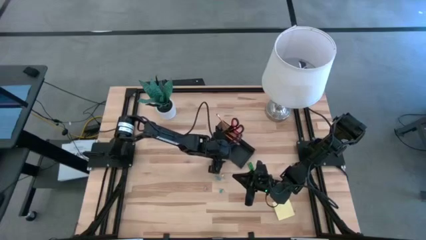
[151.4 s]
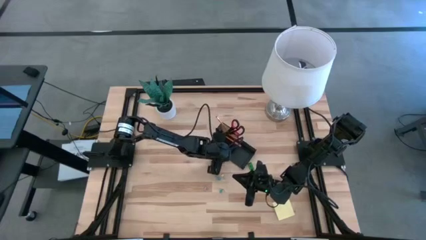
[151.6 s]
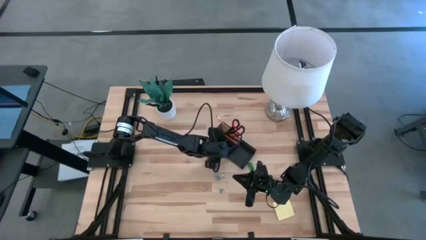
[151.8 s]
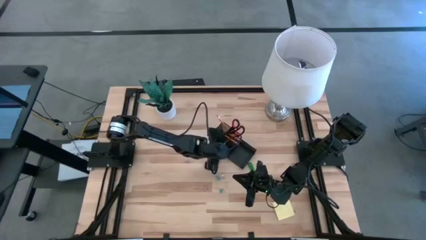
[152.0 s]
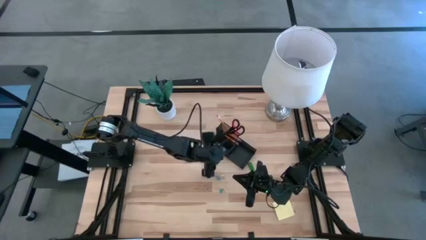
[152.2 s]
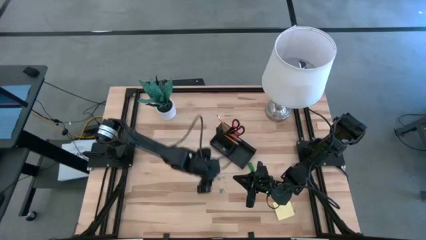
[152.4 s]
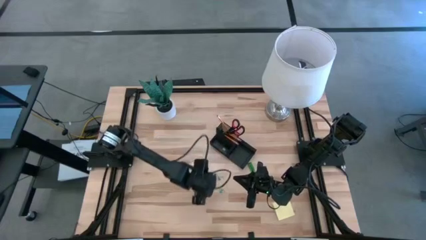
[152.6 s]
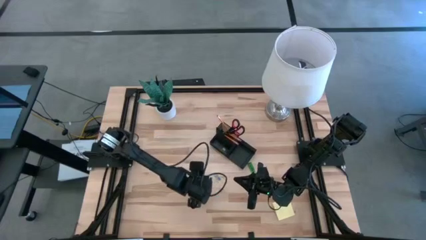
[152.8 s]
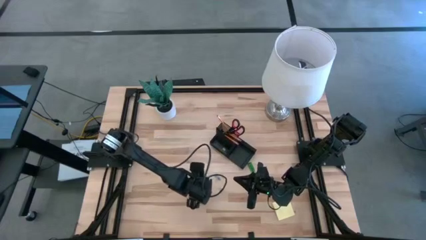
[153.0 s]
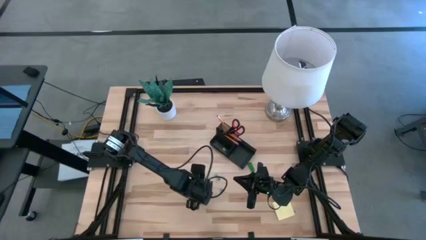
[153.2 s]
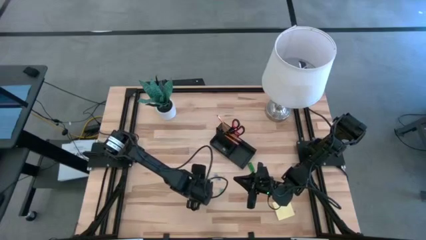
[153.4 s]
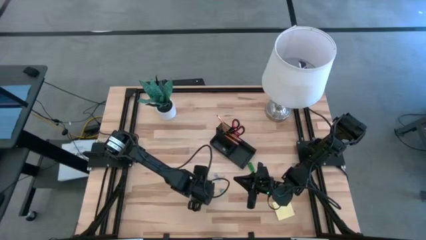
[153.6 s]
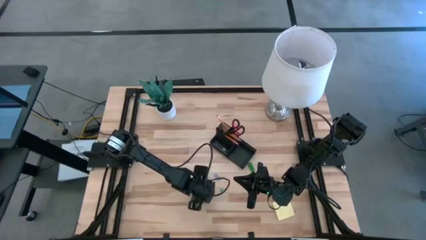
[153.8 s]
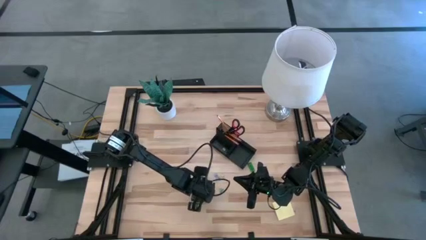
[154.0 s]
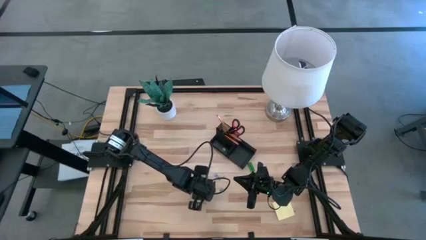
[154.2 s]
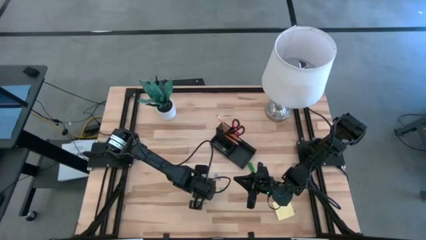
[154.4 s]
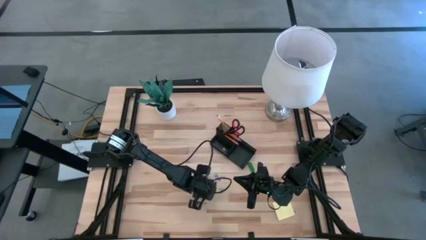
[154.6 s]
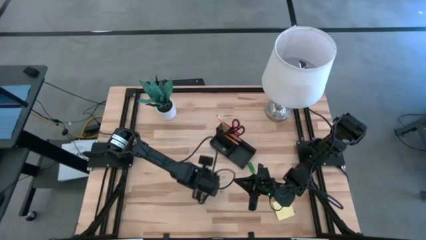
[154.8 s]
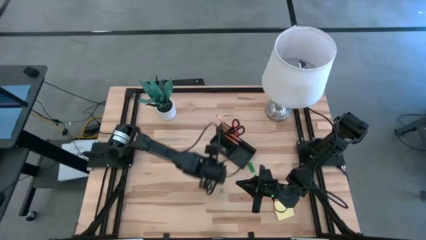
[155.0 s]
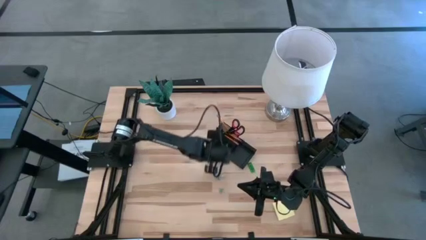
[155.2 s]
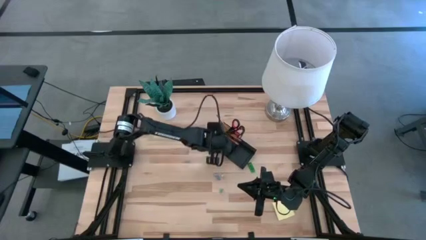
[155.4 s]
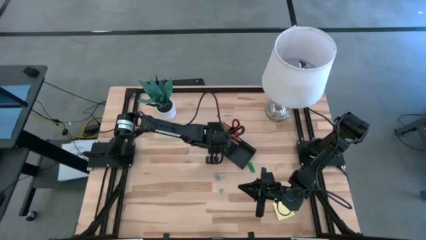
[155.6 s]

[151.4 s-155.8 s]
Task: Pick and place office supplies into organizer
Put the pink binder clip into the black desk organizer

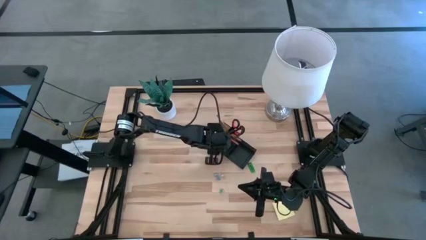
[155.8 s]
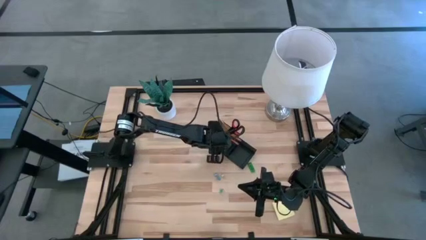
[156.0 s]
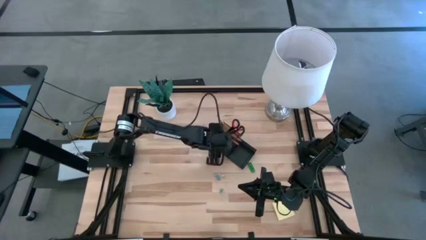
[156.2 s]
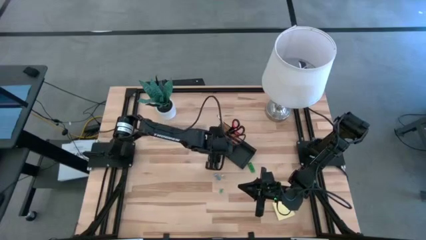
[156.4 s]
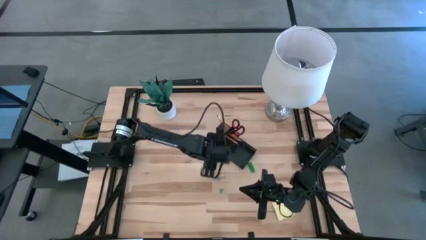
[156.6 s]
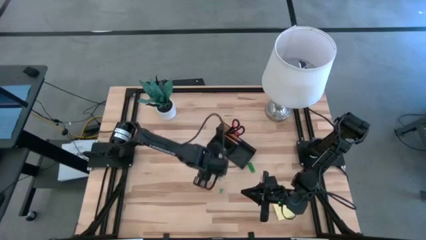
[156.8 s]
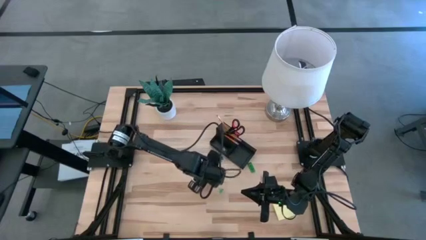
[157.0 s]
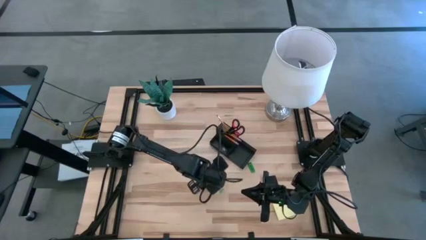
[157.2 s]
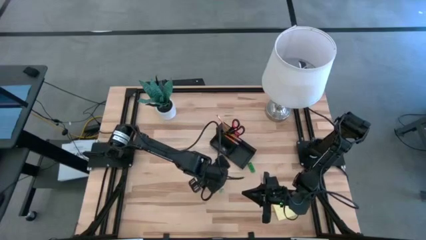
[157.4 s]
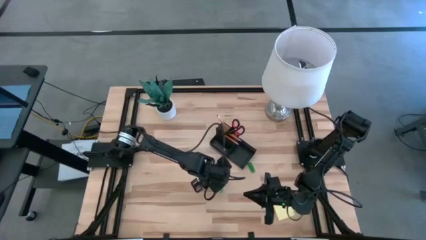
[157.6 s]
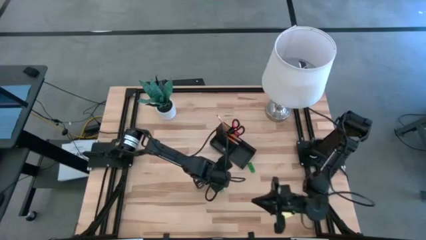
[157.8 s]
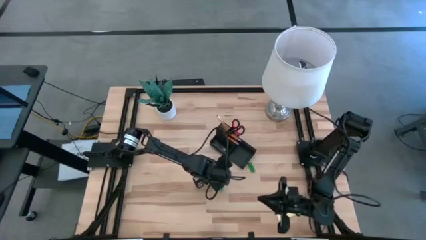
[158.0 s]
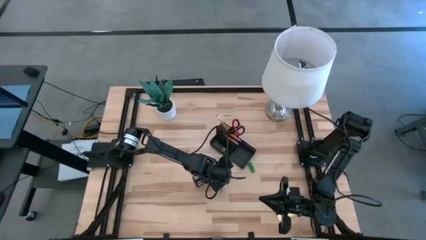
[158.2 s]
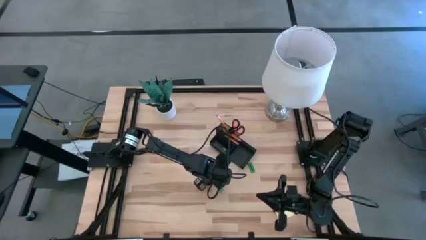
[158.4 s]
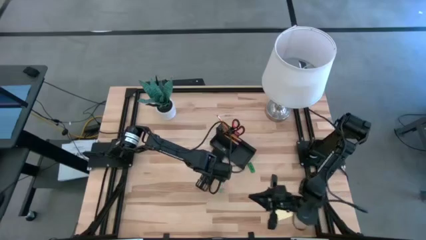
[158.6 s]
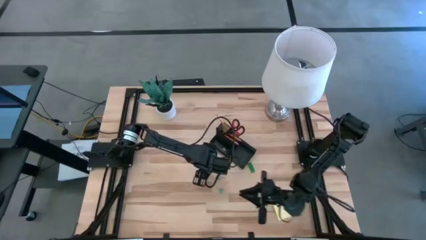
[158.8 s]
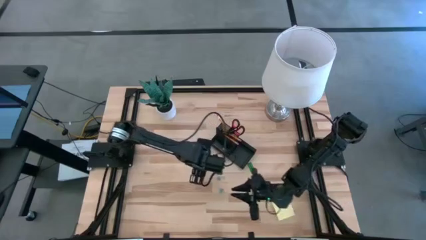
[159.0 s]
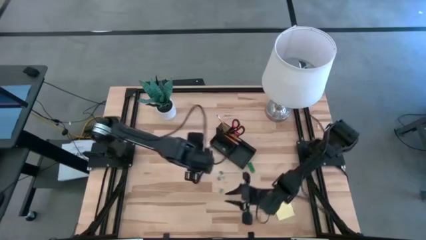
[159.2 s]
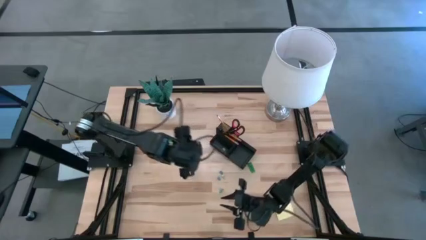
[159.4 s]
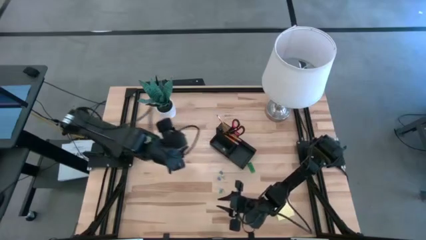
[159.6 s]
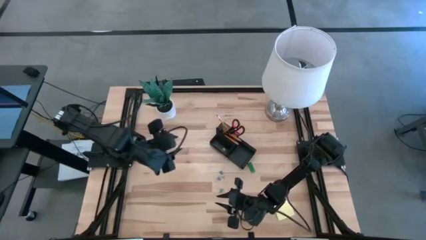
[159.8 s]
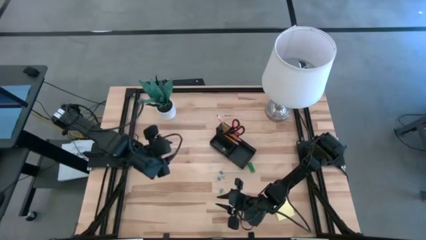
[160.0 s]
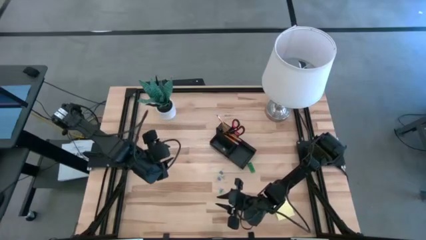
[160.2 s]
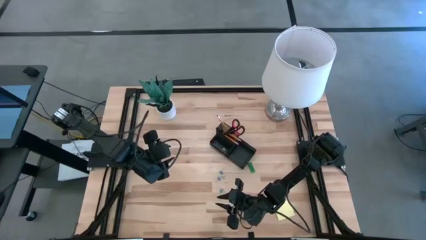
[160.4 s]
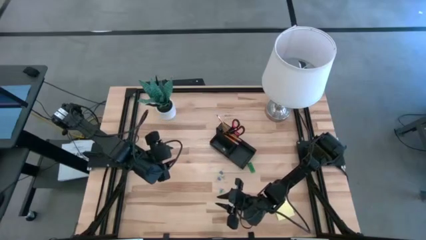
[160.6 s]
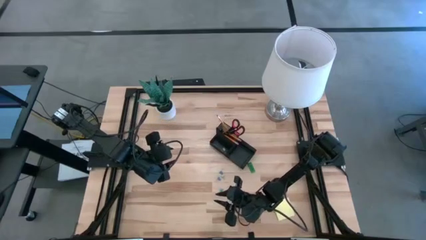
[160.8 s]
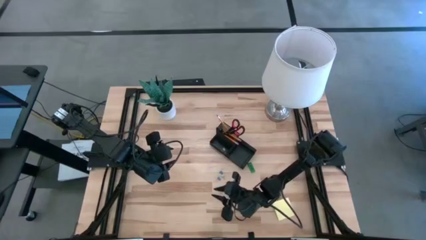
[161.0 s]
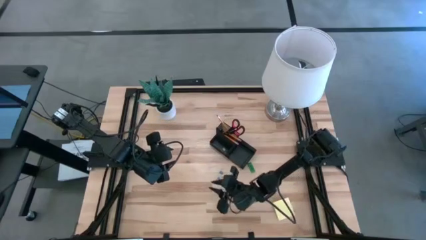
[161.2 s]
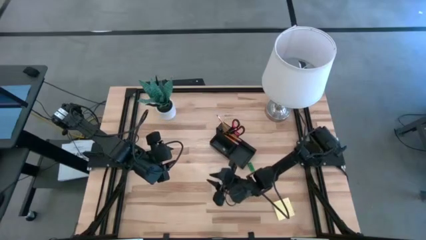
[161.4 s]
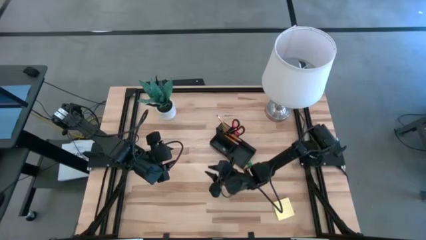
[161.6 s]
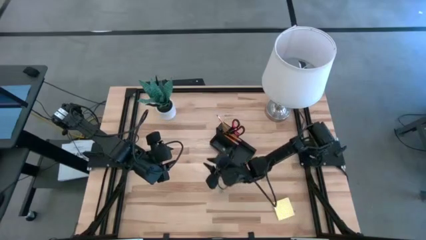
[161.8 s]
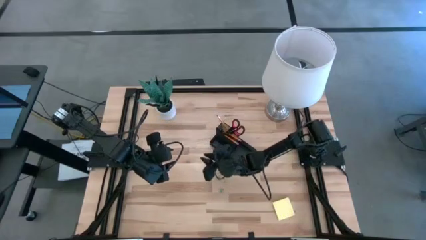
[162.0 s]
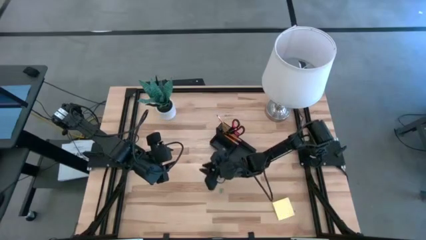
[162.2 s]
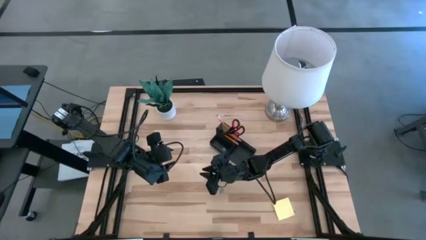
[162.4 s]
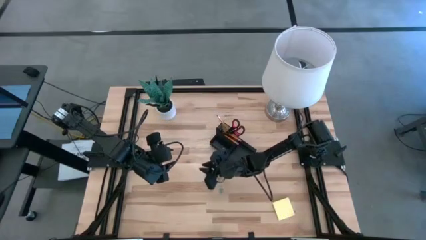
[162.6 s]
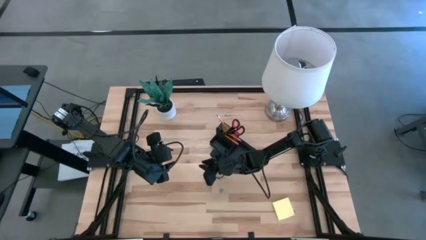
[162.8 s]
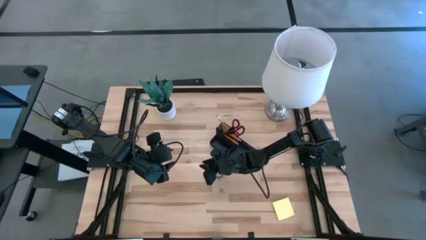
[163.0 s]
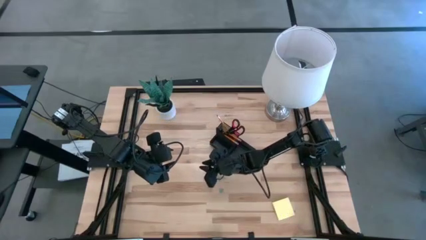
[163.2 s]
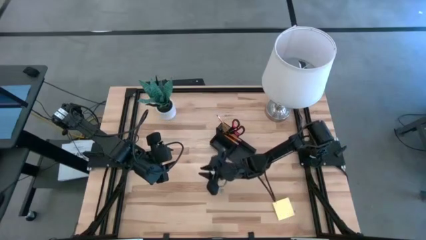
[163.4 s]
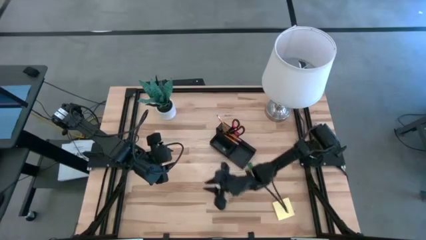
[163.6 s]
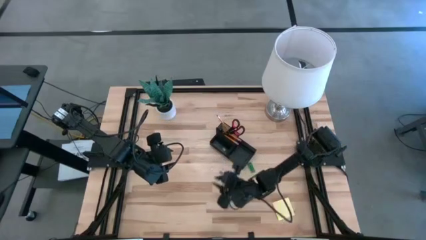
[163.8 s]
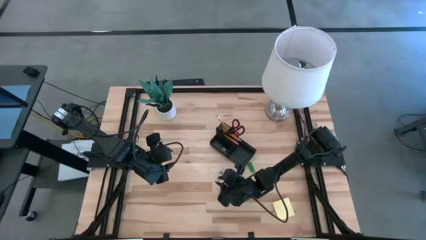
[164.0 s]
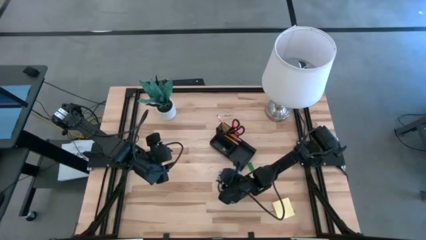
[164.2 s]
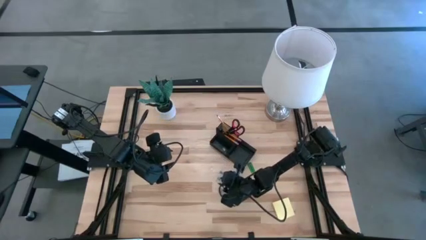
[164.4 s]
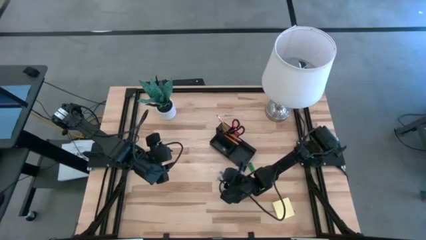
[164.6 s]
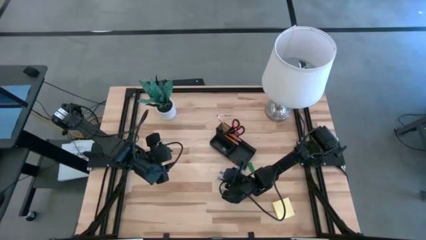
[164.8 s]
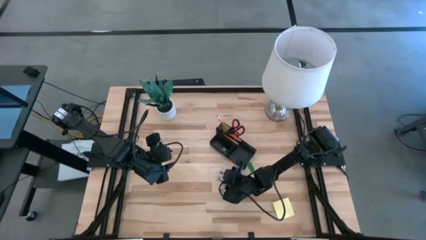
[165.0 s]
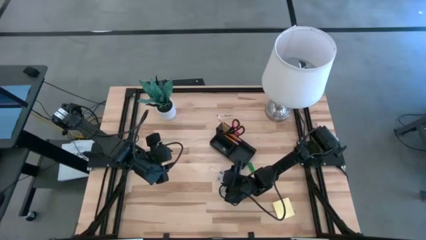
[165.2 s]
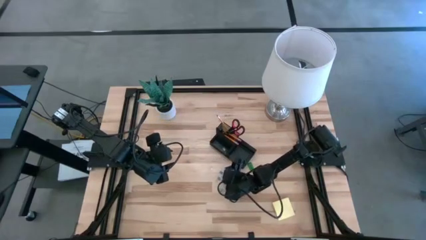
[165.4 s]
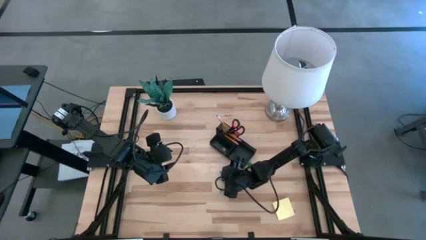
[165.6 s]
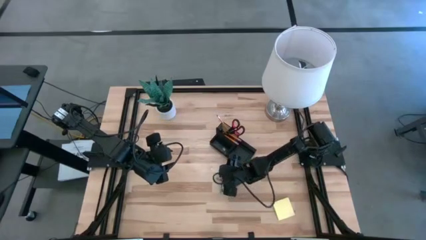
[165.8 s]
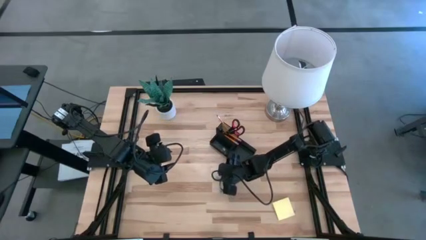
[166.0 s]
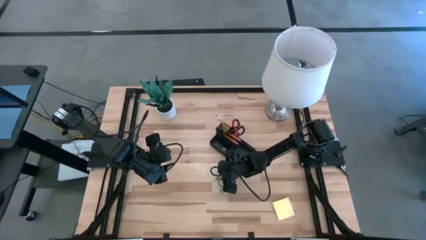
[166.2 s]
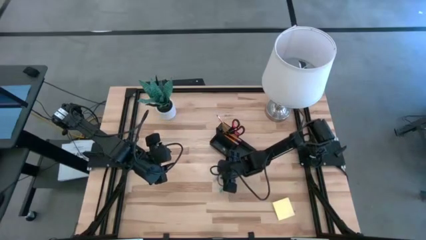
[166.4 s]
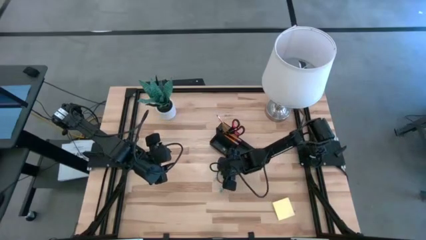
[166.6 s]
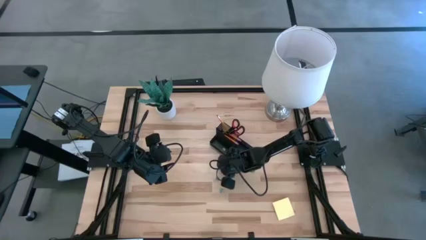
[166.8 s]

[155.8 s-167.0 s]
Put the yellow binder clip into the black desk organizer
